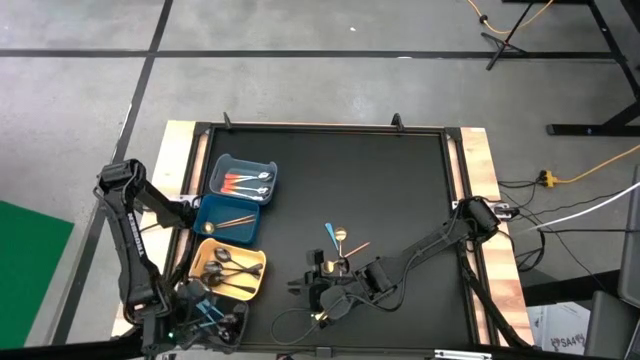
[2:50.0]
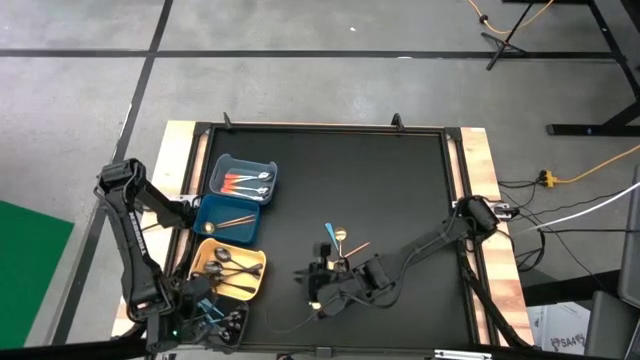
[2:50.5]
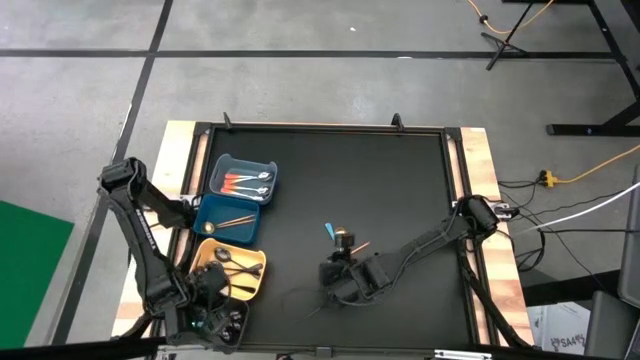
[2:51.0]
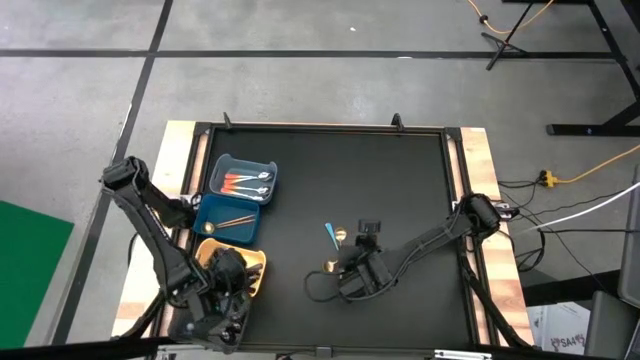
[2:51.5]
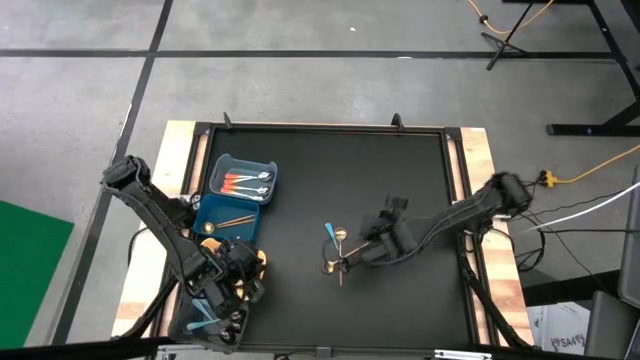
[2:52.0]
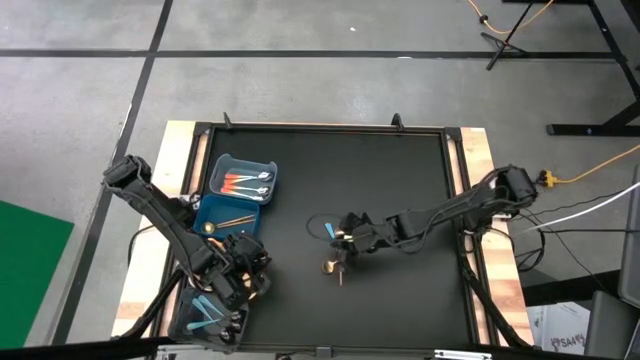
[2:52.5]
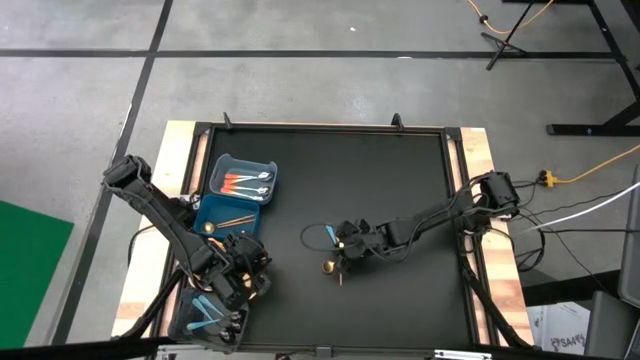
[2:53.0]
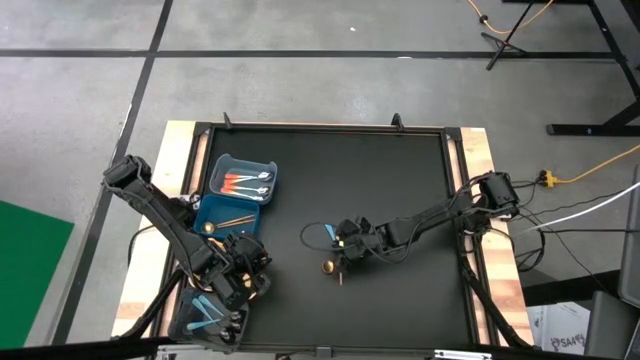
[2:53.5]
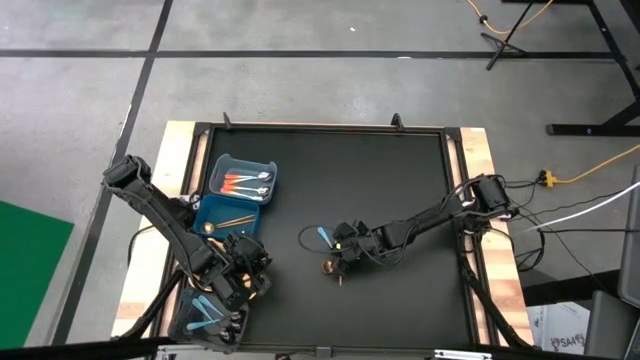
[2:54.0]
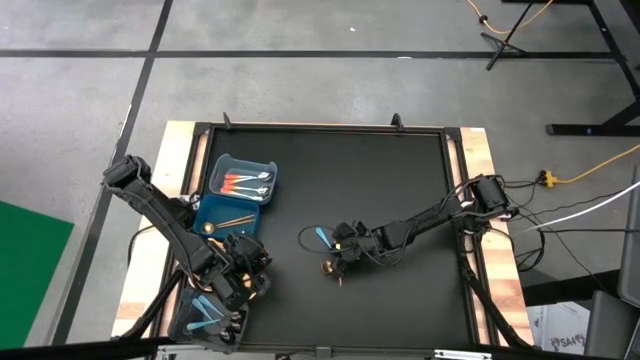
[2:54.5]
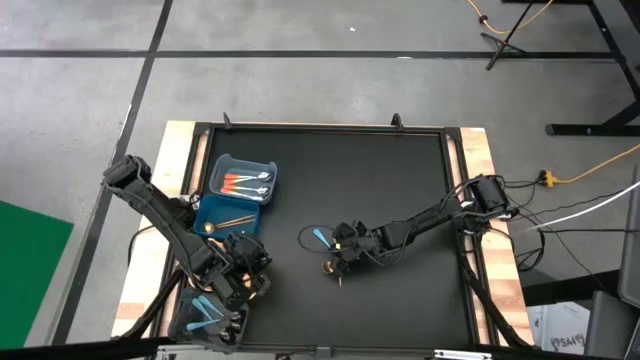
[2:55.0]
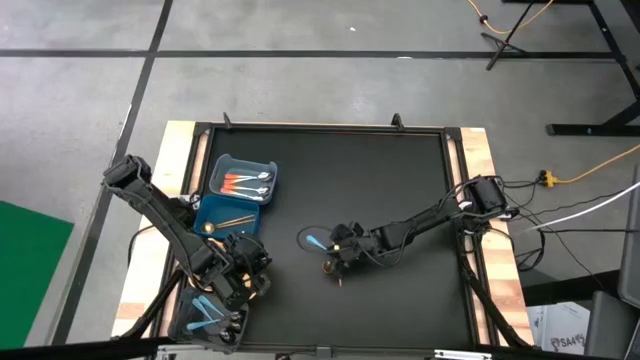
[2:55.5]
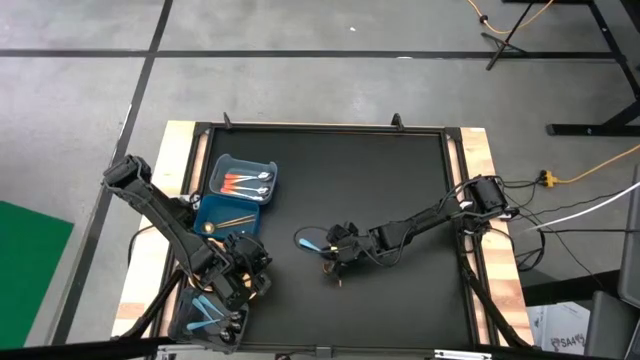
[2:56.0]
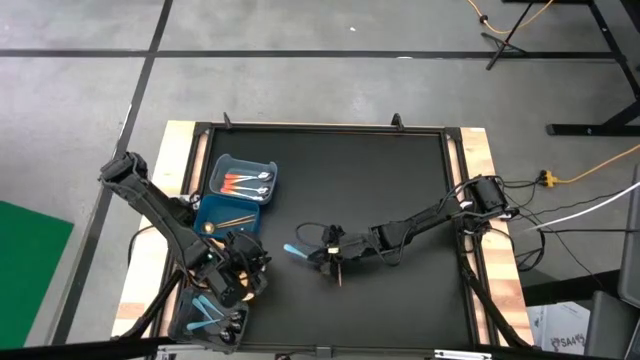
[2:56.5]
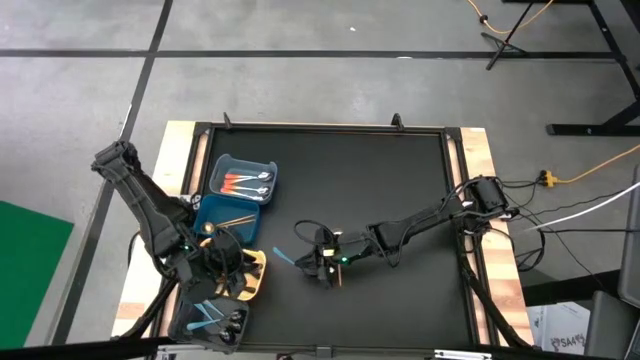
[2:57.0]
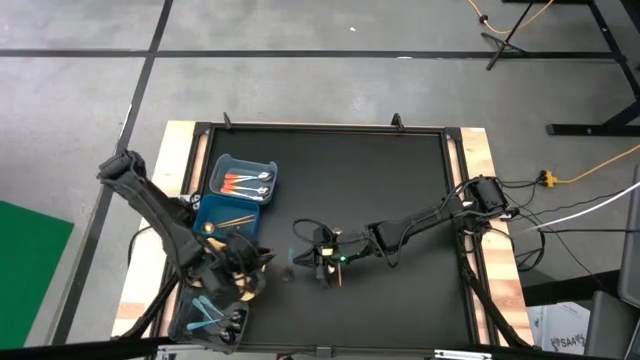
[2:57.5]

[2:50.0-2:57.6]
Task: Sort silverware by color (type)
Put the blue spoon into the black bin

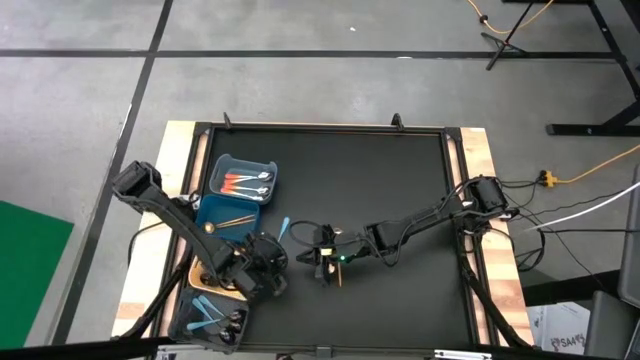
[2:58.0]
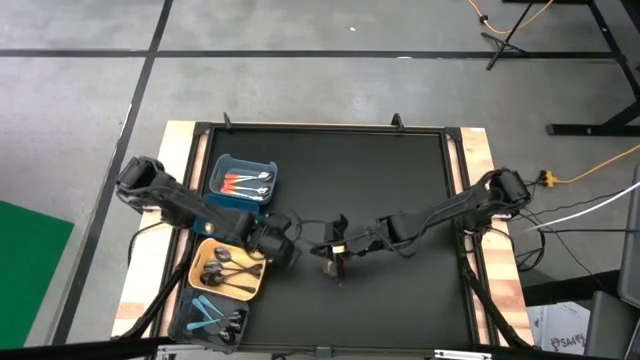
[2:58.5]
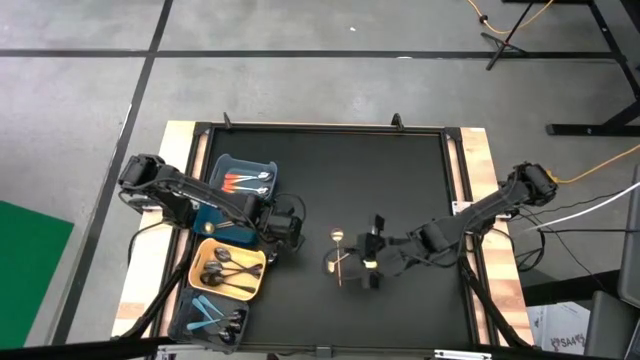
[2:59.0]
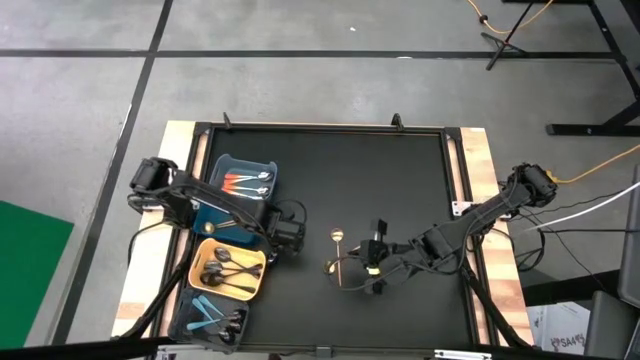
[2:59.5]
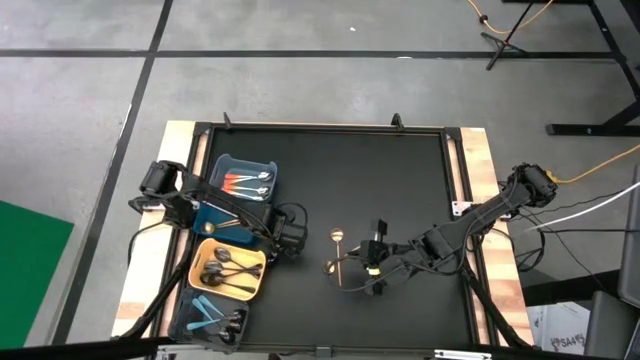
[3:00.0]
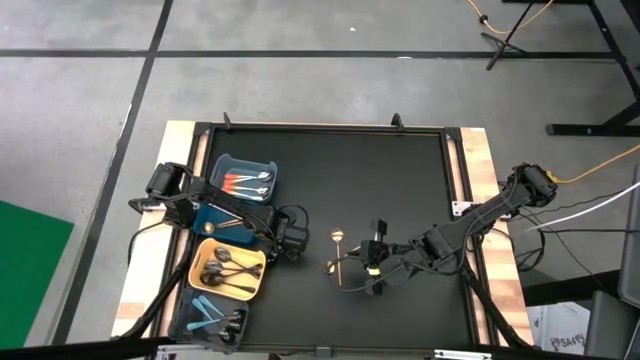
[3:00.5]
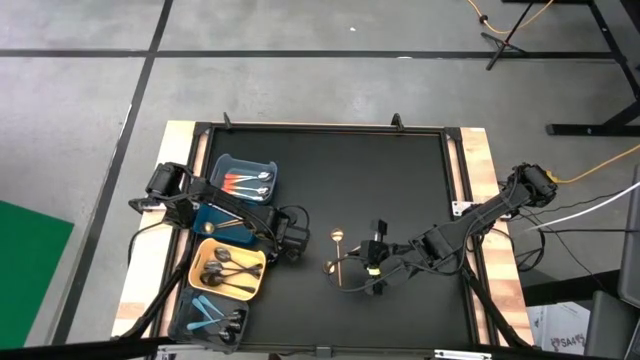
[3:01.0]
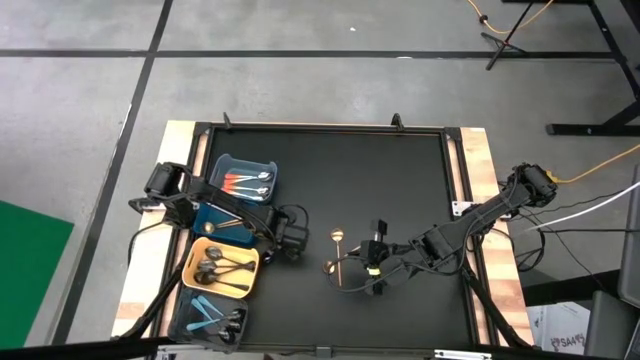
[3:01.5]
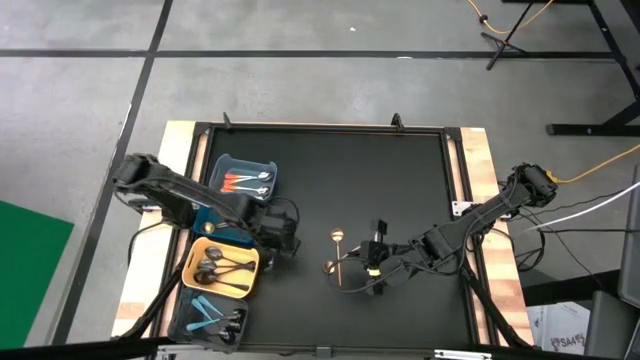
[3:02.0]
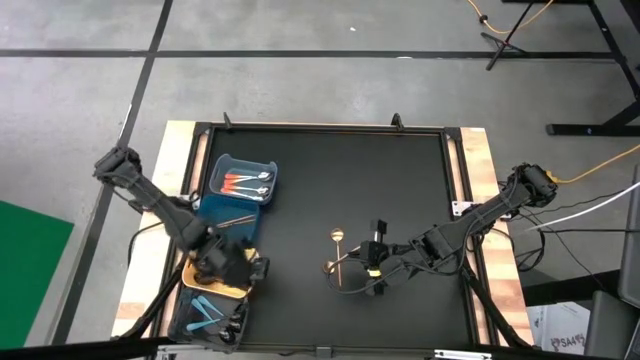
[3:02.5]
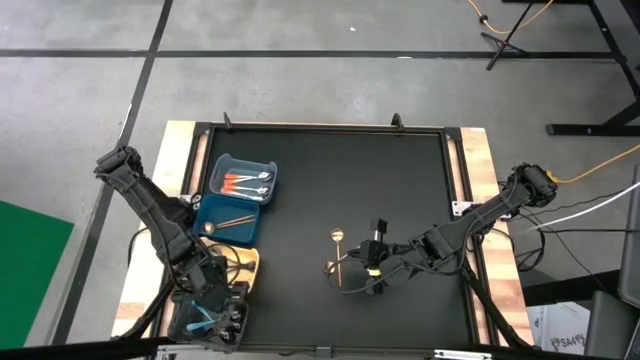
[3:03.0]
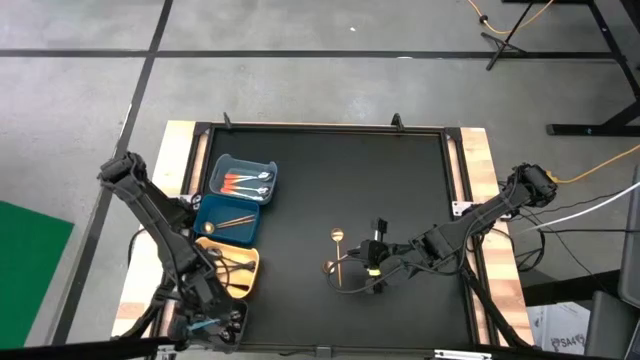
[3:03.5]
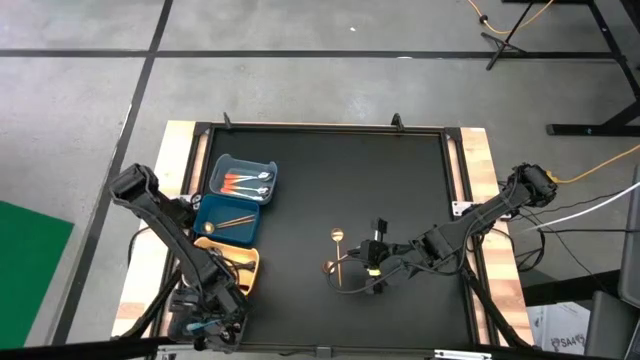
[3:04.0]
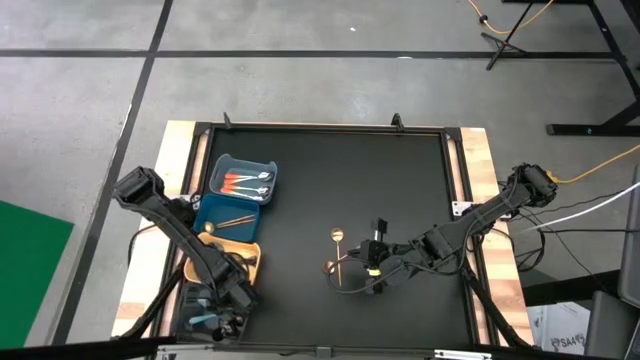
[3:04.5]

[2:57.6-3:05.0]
Put the blue spoon into the black bin

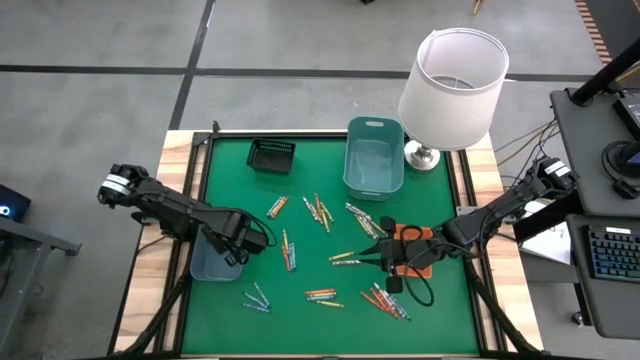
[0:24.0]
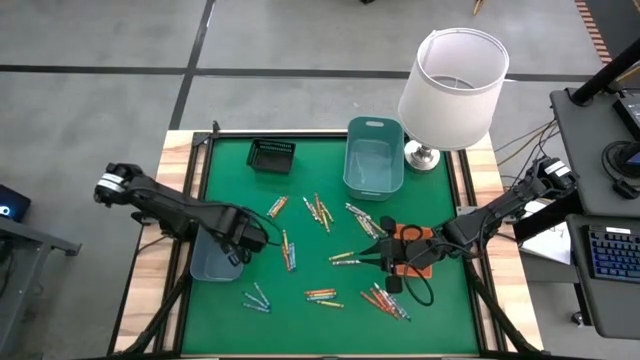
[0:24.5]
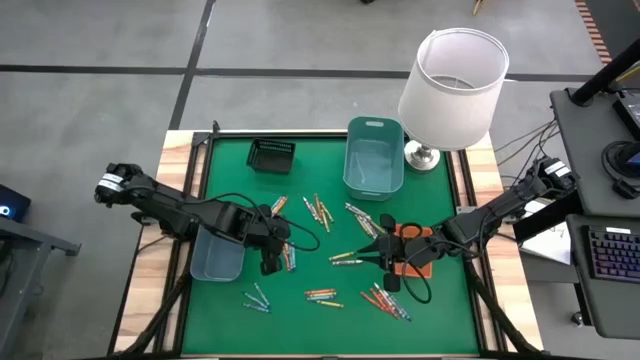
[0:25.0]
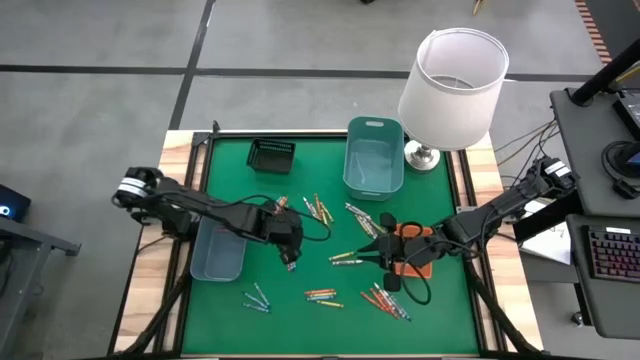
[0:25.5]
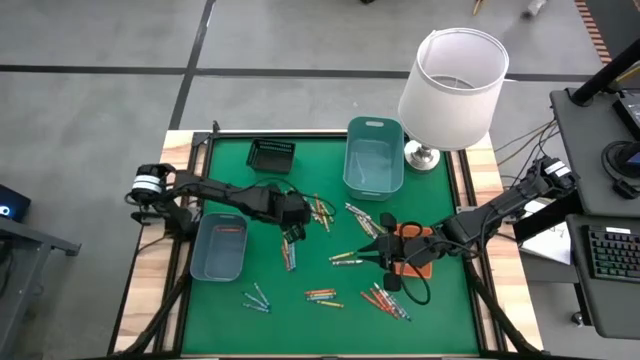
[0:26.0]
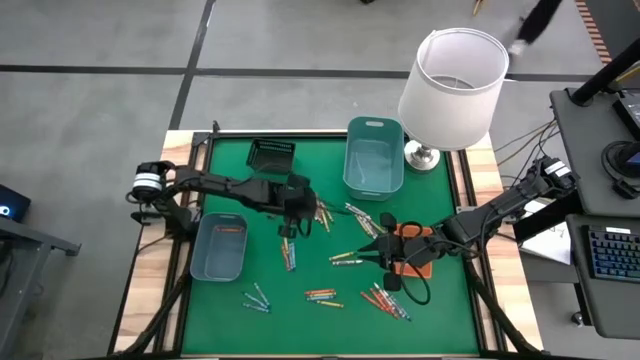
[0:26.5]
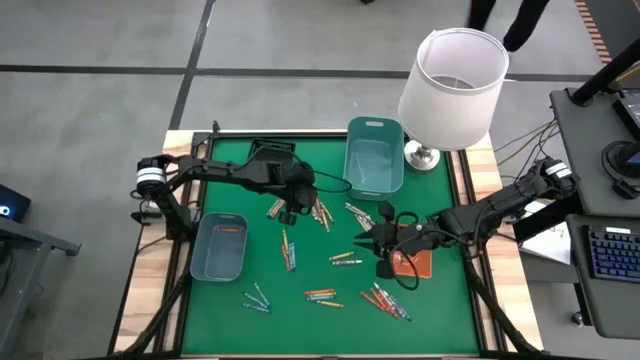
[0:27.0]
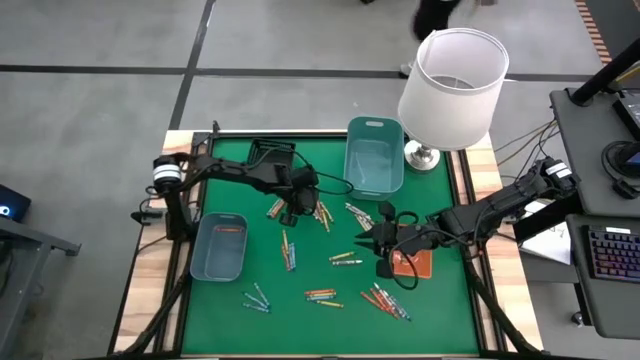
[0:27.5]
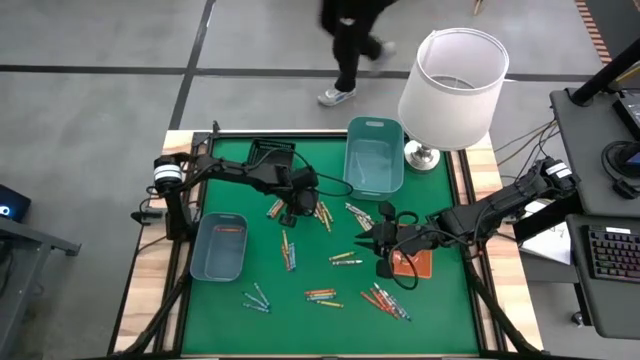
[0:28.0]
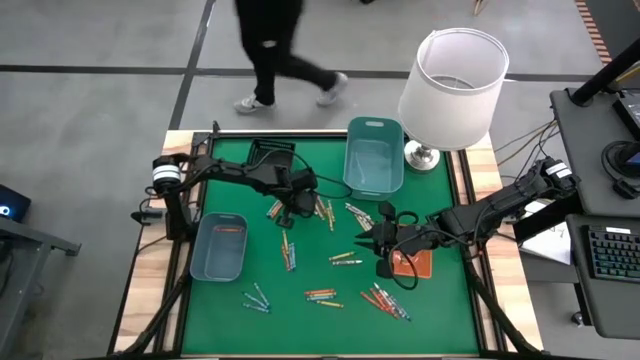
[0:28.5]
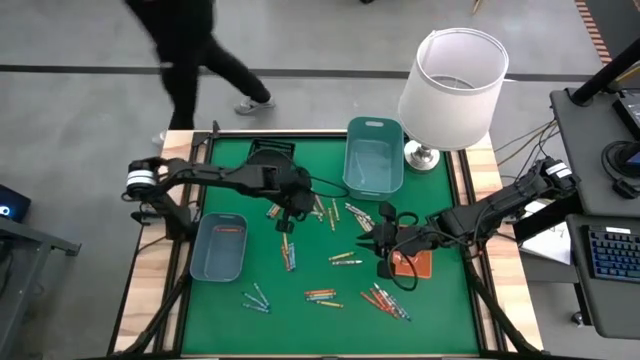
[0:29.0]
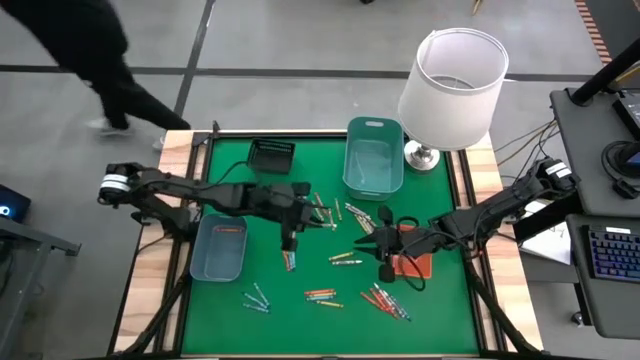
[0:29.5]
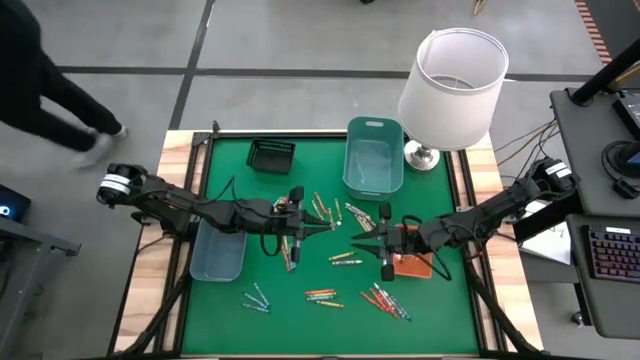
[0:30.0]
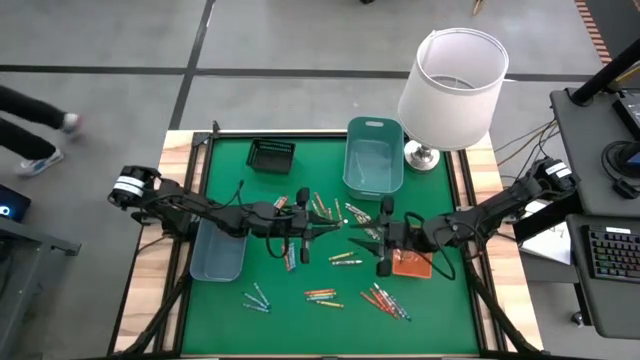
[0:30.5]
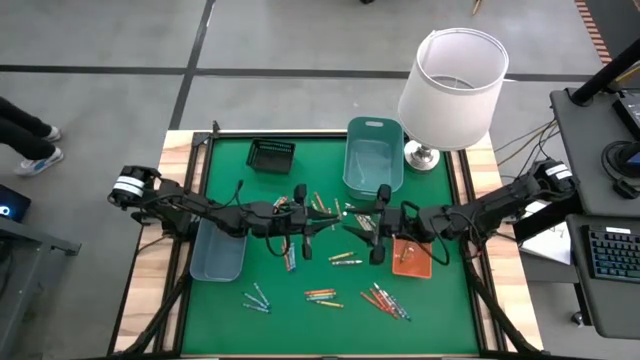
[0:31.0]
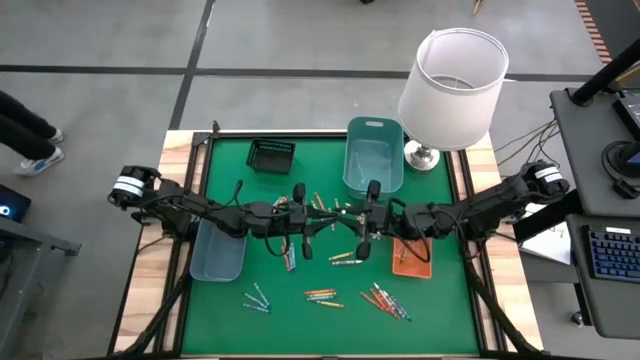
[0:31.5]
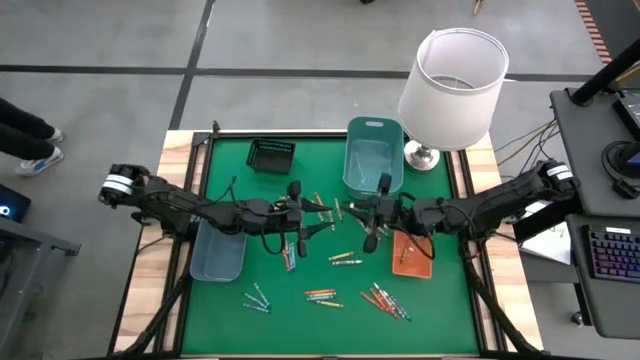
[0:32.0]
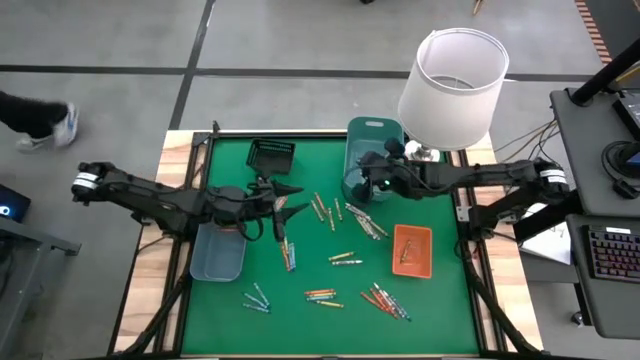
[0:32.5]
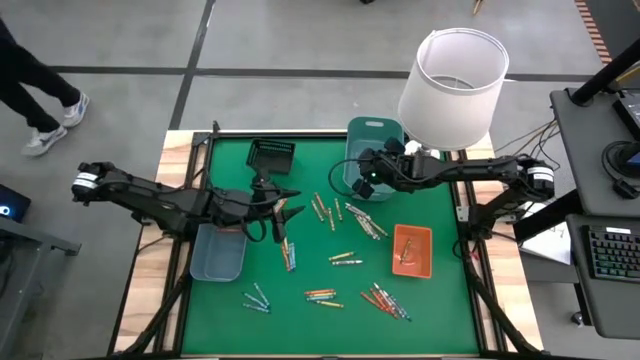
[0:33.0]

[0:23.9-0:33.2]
Task: Sort crayons
Put the white crayon into the green bin
